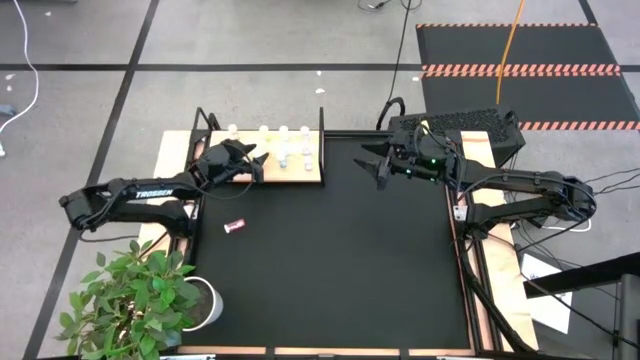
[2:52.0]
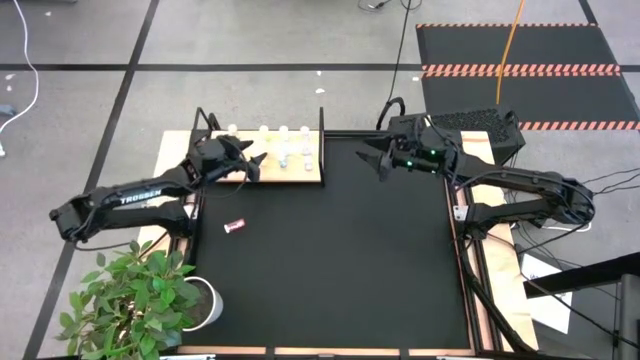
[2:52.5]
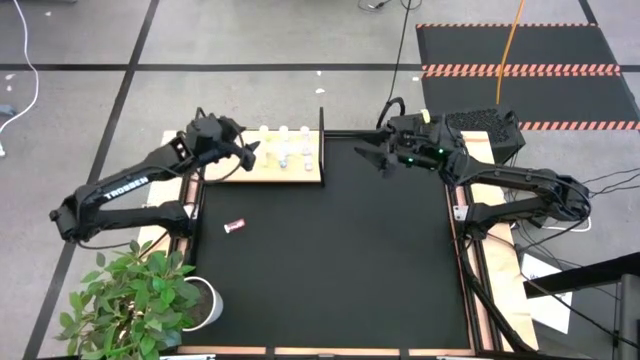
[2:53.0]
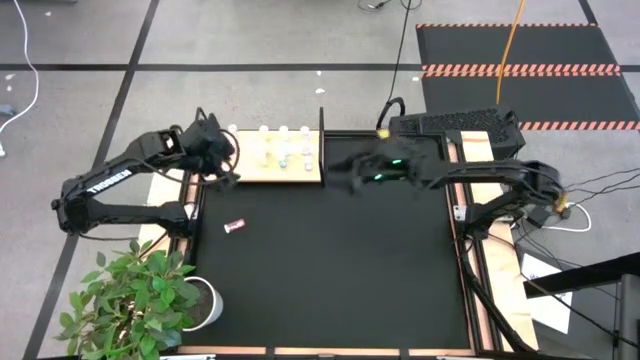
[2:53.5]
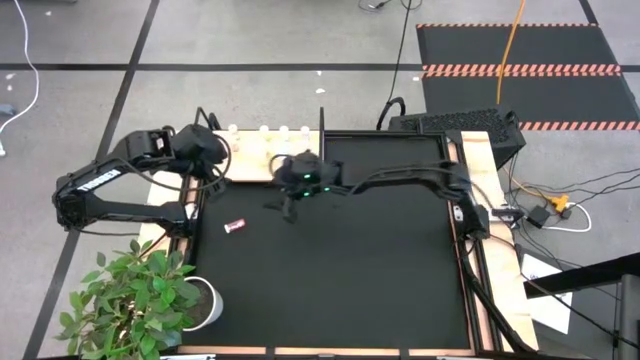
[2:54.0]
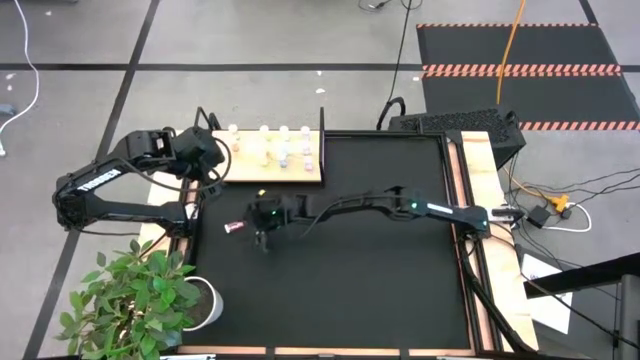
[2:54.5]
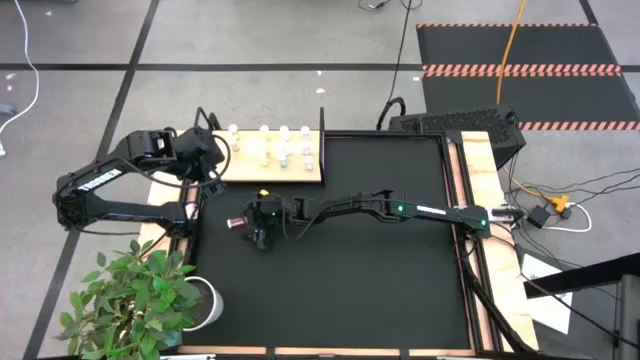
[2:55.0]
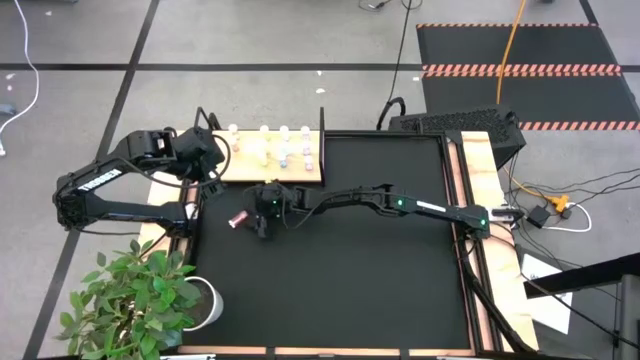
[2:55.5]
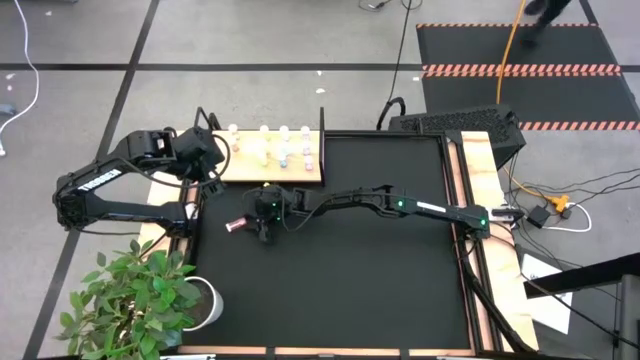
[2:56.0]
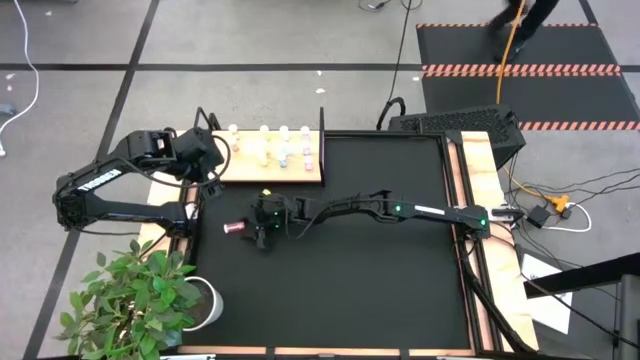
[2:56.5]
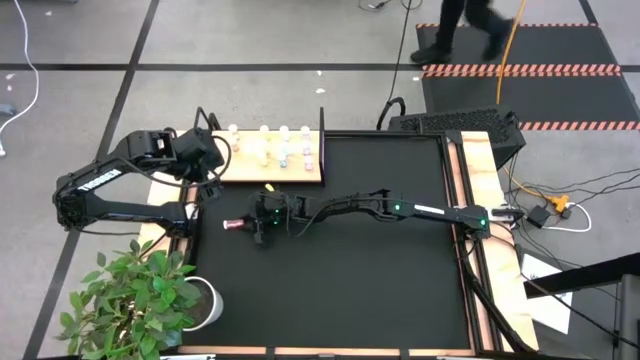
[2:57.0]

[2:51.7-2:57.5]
Task: Pick and place medicine bottles onto shelf by color
Put the pink pill bottle on the shelf aligned with the other pink pill bottles

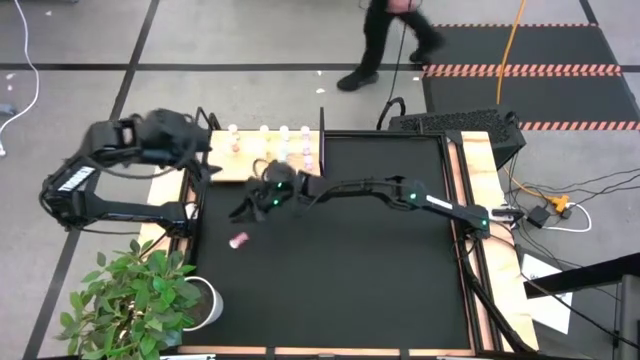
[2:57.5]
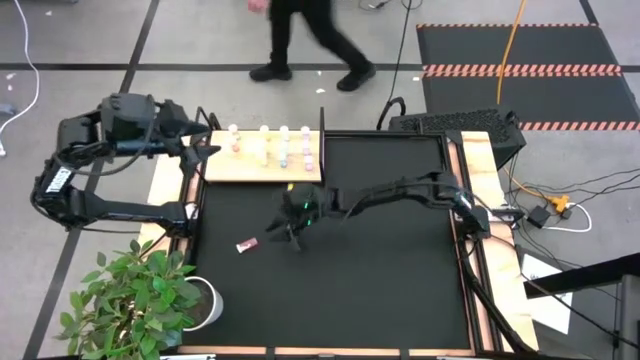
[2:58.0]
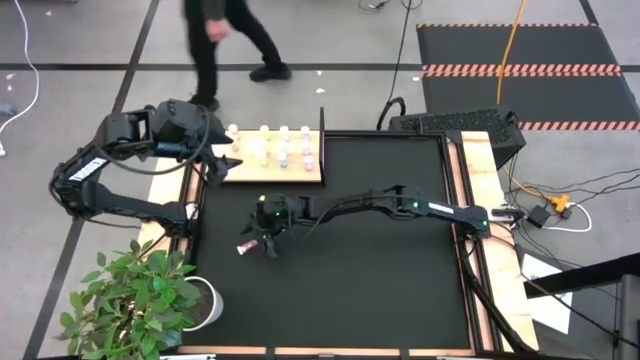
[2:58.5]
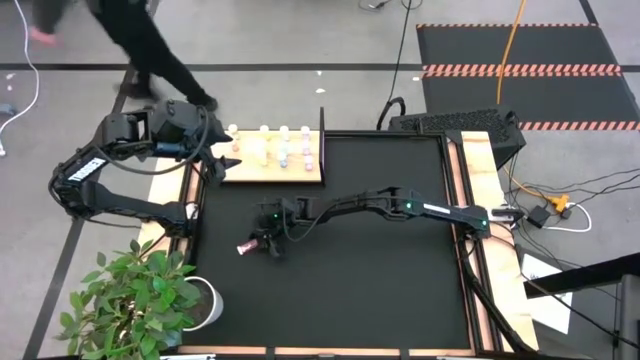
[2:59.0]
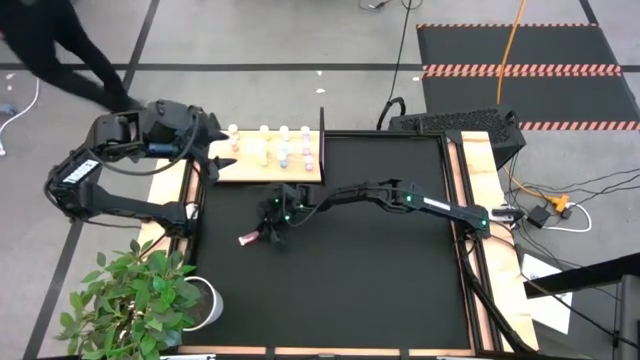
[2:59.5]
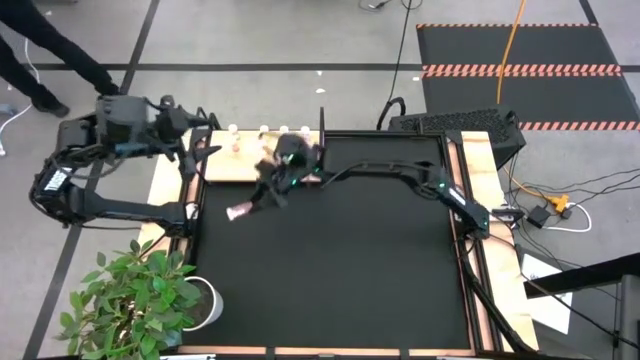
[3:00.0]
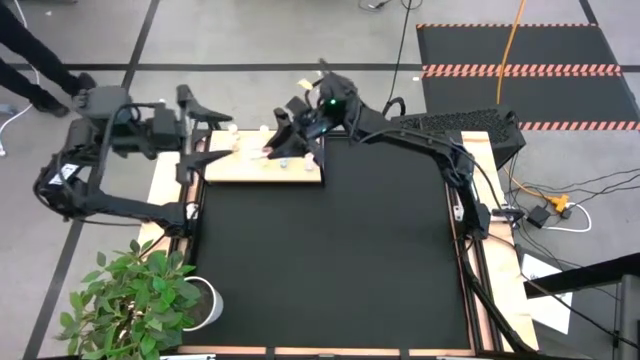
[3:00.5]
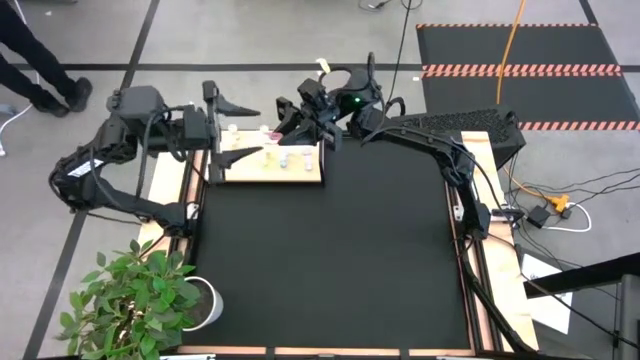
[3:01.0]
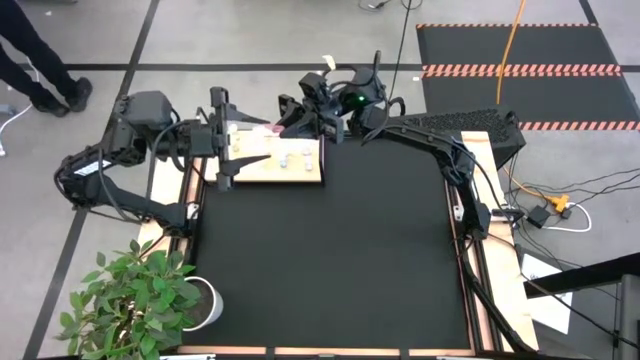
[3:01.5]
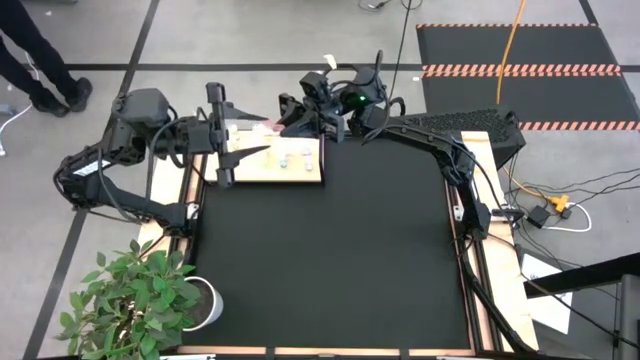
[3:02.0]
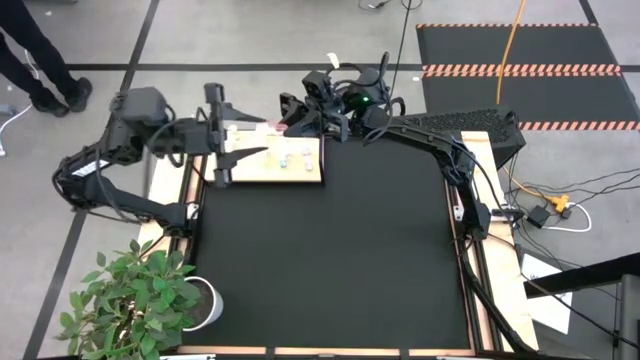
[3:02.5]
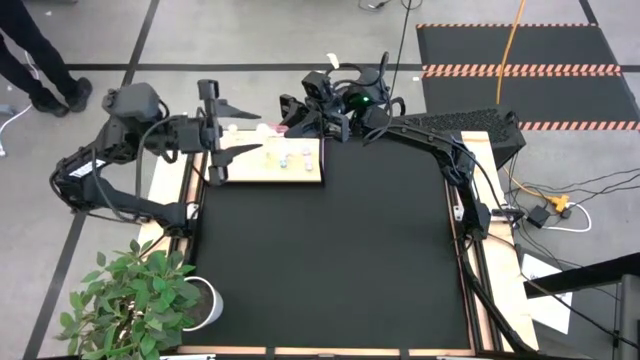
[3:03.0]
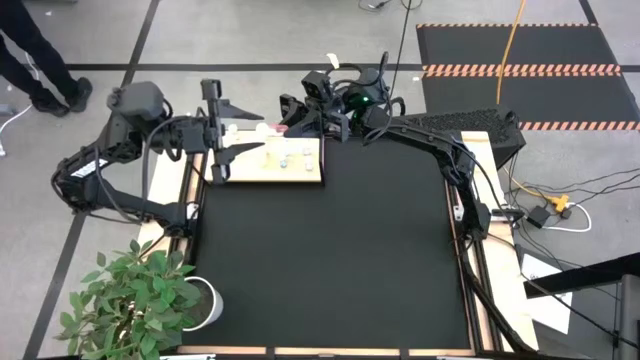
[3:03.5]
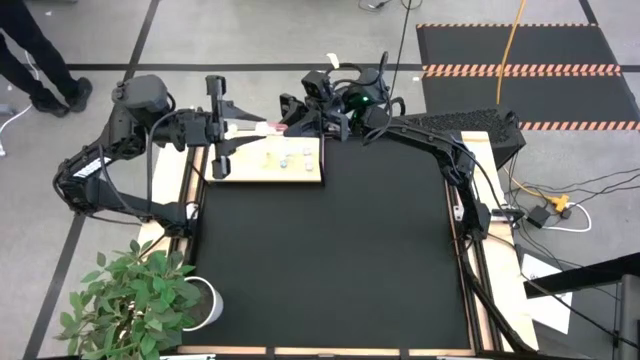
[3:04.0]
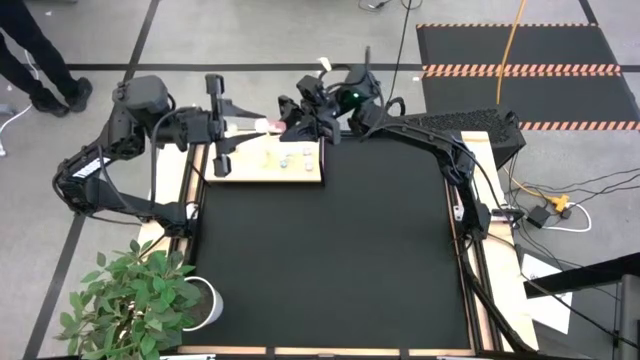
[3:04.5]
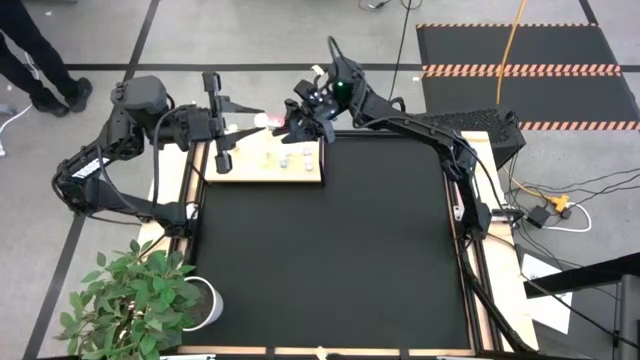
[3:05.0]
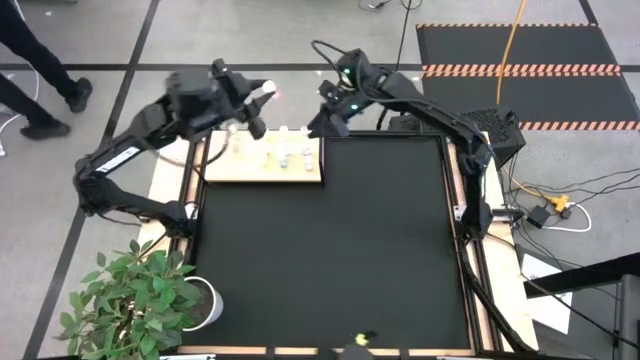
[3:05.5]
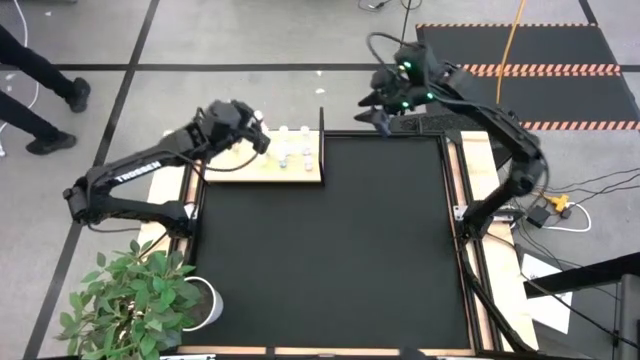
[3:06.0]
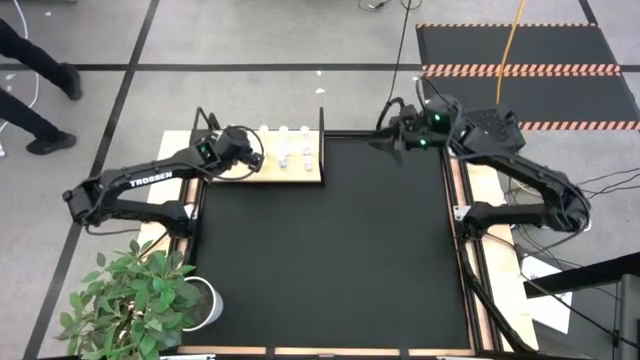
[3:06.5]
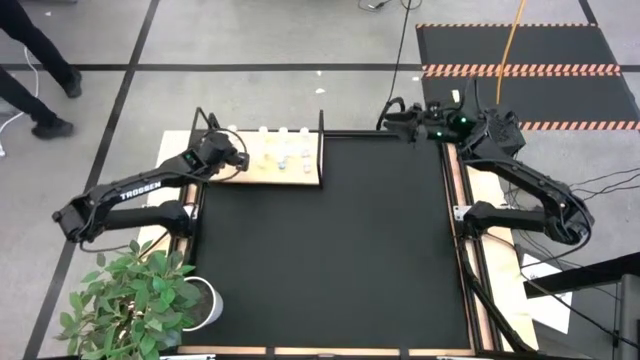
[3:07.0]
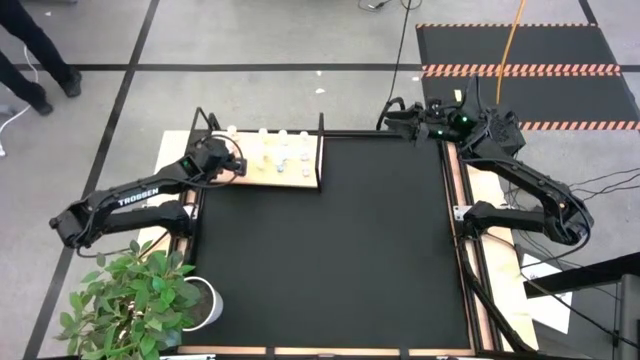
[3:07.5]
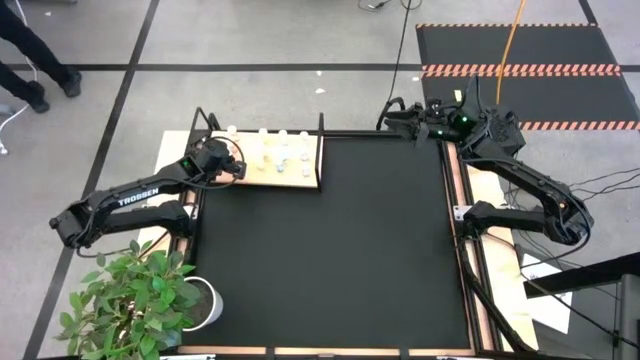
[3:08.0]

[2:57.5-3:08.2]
Put the pink pill bottle on the shelf aligned with the other pink pill bottles

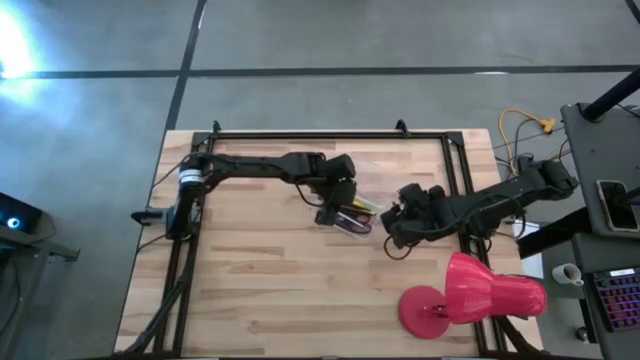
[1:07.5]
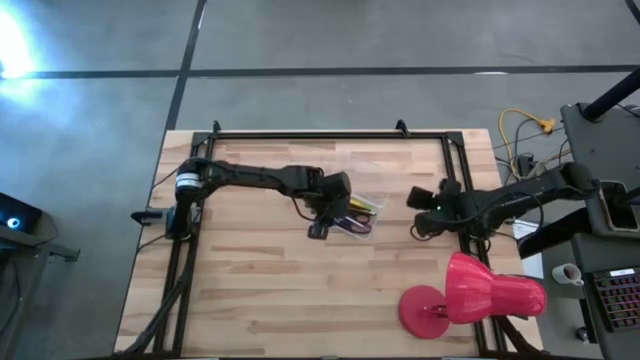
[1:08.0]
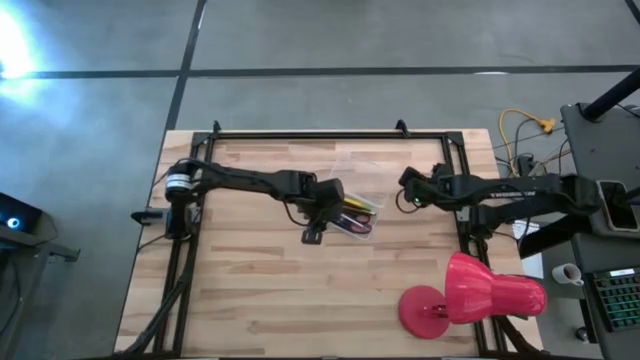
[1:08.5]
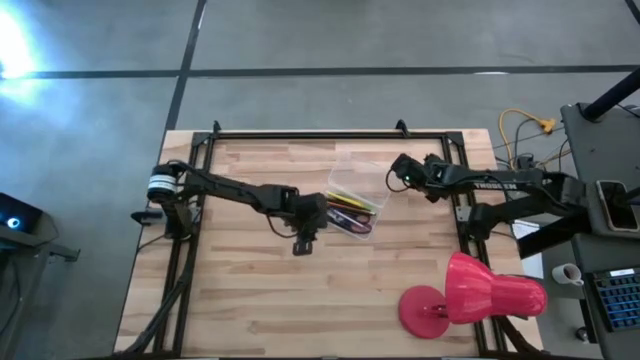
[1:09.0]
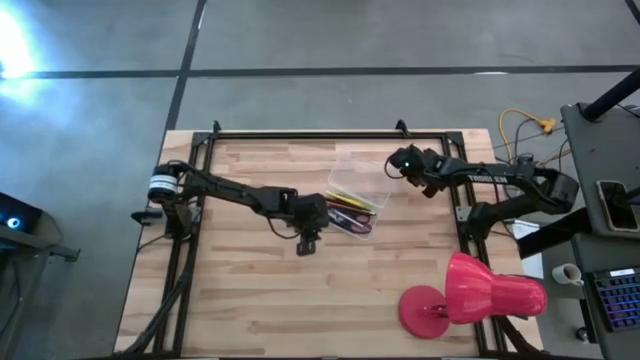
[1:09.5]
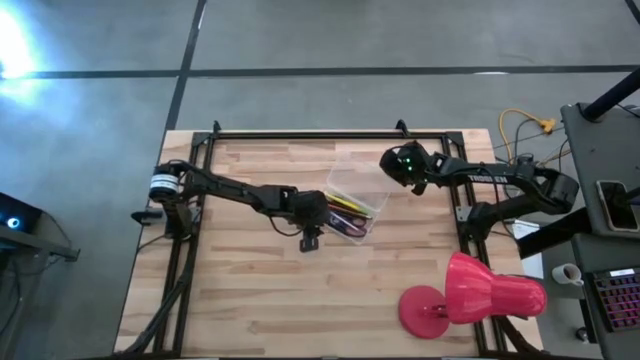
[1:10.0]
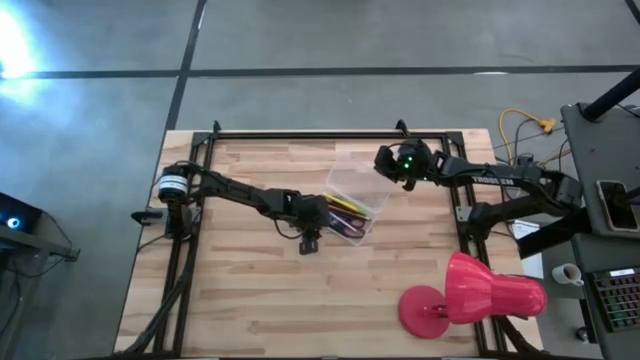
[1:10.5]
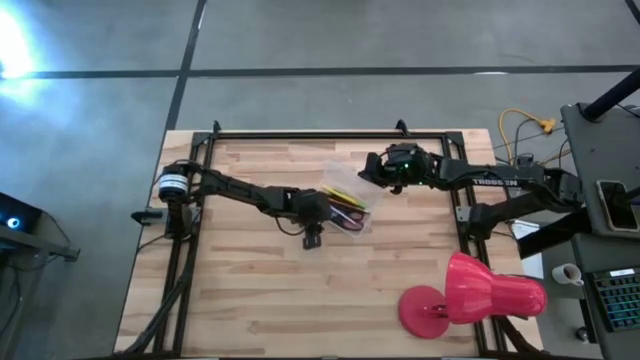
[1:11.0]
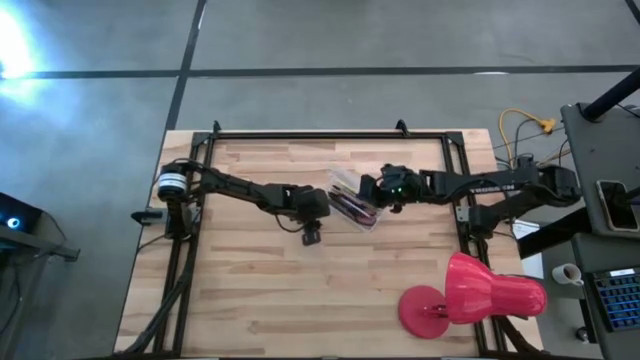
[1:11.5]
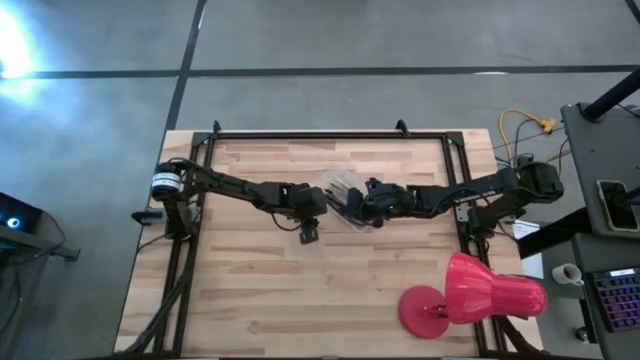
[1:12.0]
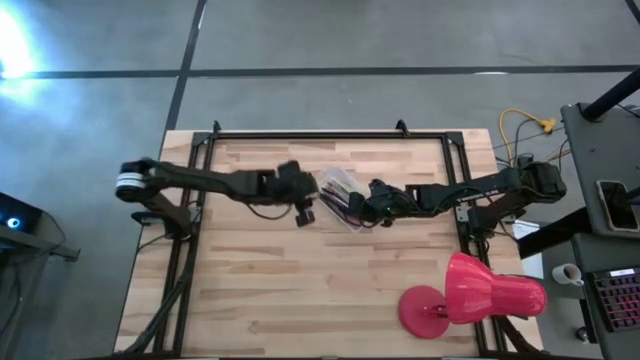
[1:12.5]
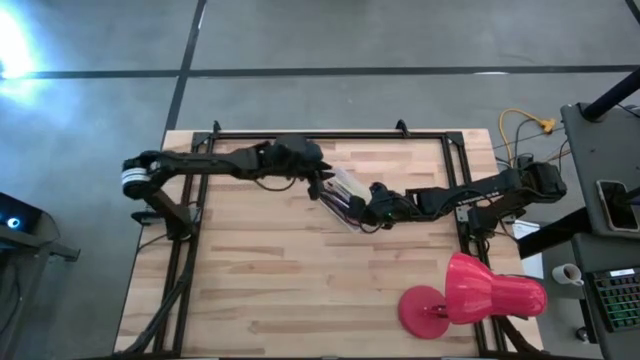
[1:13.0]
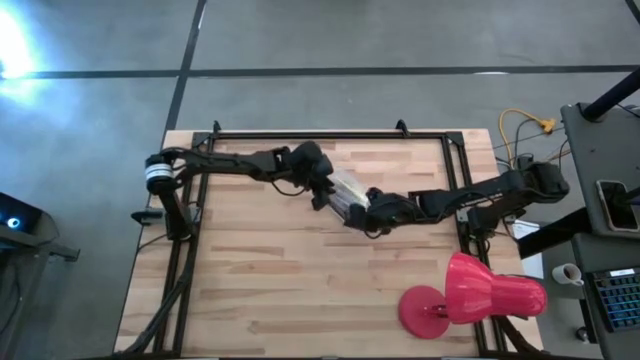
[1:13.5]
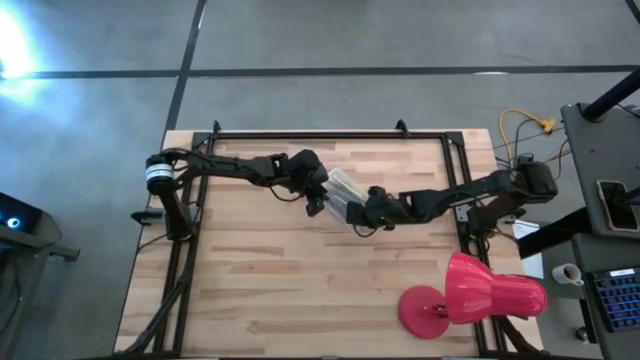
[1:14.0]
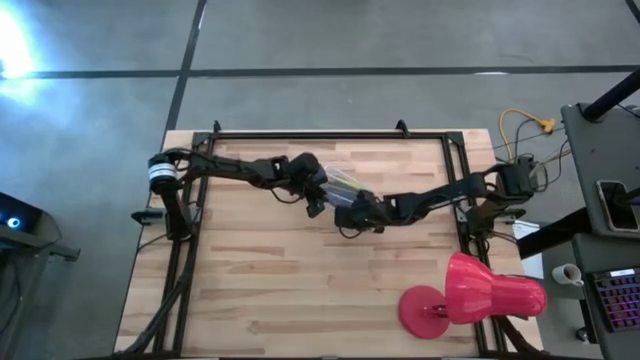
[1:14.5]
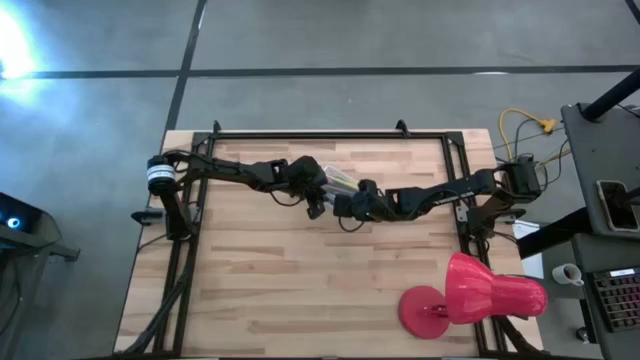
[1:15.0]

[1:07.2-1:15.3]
Task: Pick & place school supplies into a supply box
Close the transparent supply box
